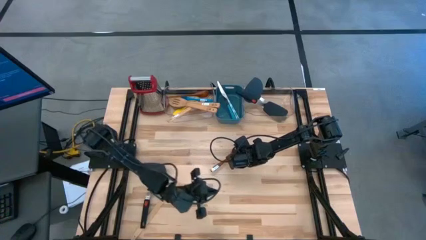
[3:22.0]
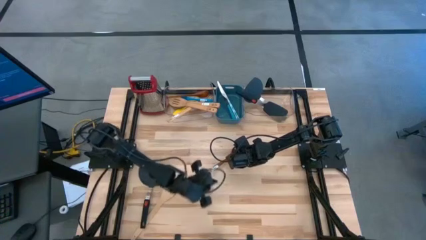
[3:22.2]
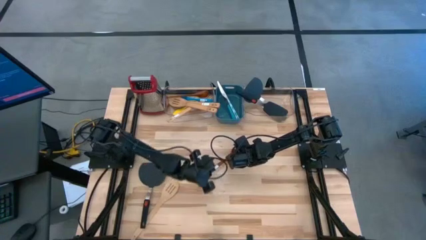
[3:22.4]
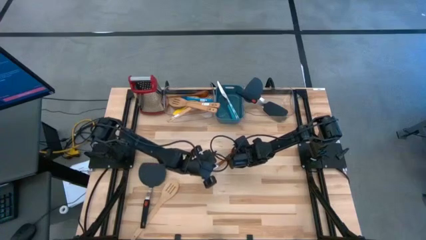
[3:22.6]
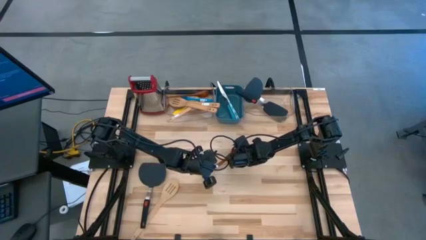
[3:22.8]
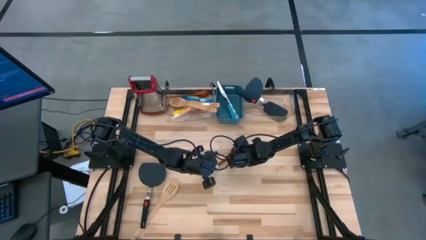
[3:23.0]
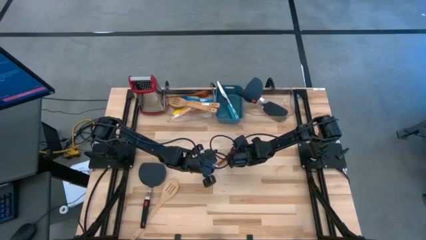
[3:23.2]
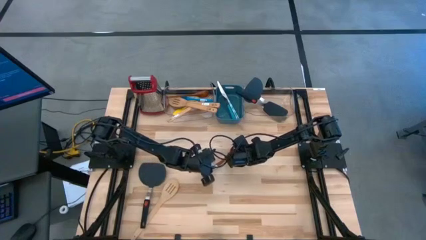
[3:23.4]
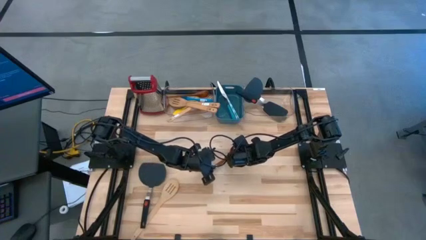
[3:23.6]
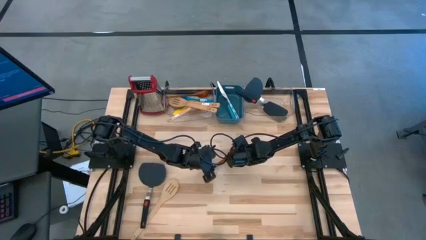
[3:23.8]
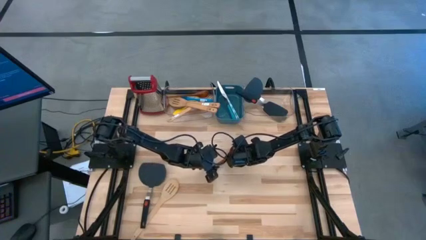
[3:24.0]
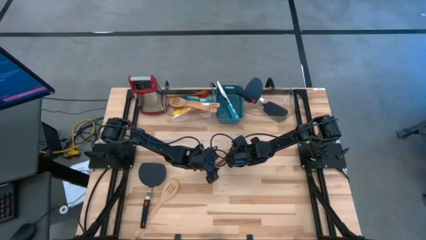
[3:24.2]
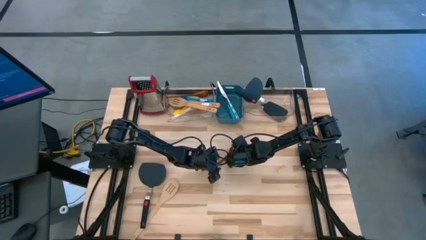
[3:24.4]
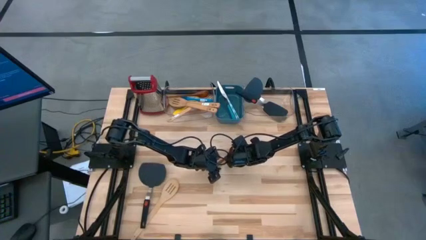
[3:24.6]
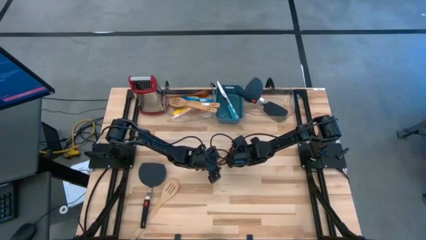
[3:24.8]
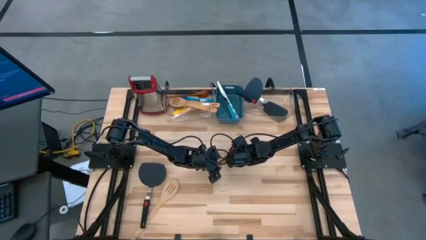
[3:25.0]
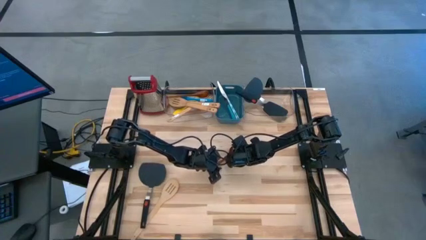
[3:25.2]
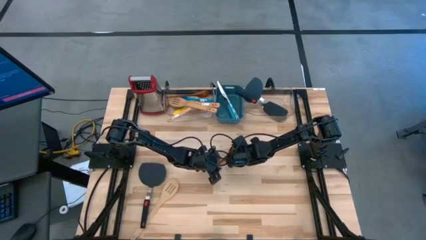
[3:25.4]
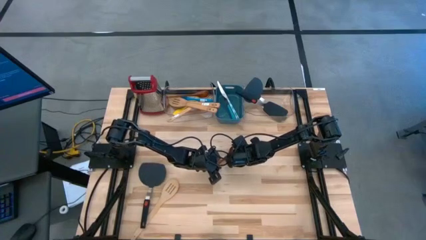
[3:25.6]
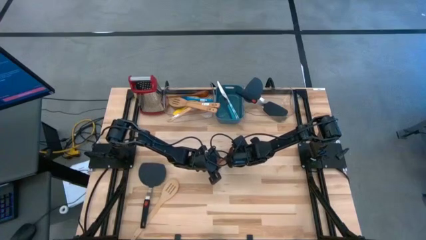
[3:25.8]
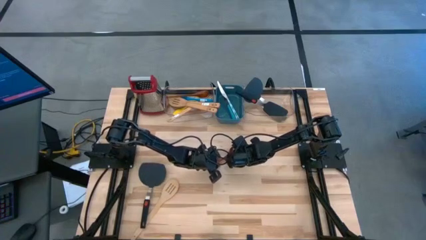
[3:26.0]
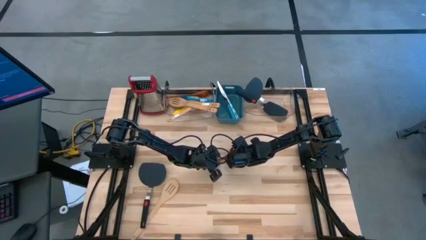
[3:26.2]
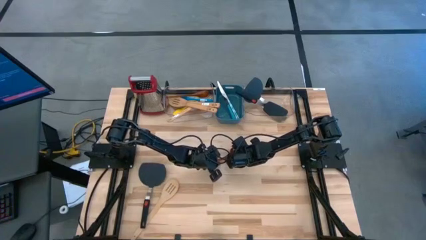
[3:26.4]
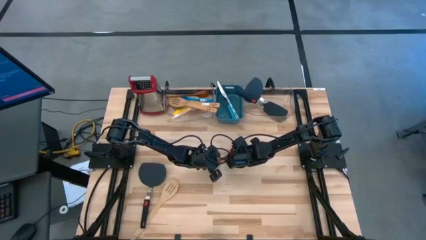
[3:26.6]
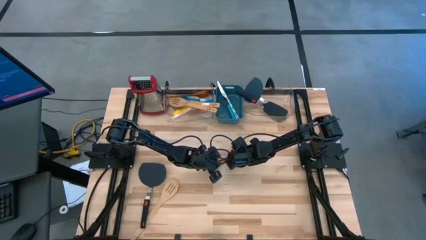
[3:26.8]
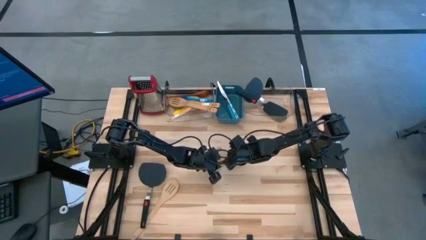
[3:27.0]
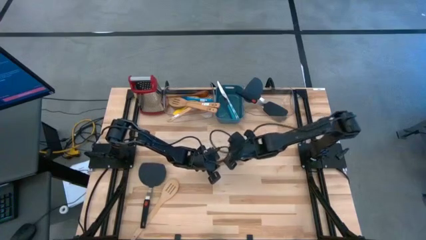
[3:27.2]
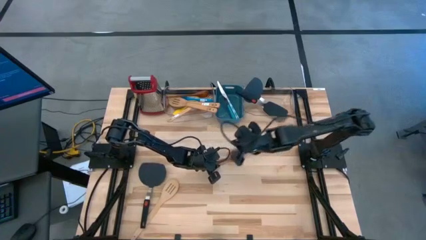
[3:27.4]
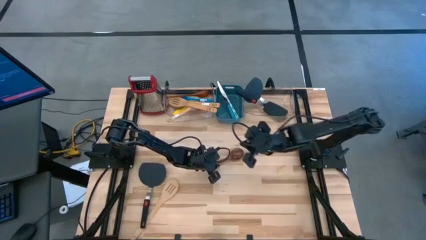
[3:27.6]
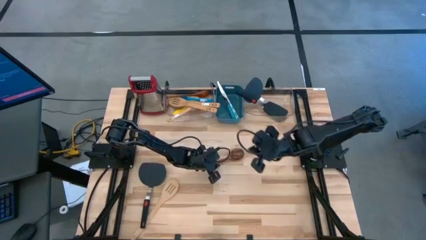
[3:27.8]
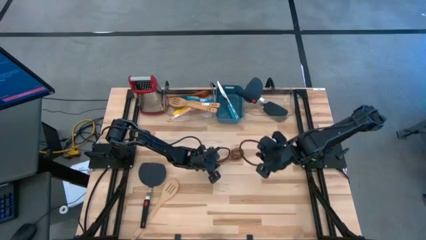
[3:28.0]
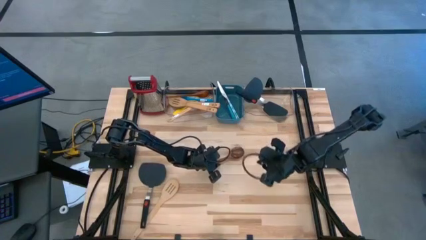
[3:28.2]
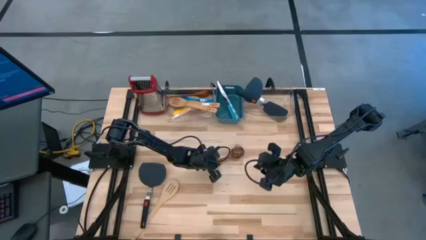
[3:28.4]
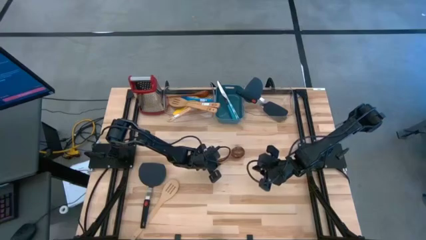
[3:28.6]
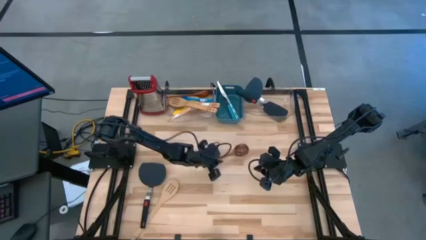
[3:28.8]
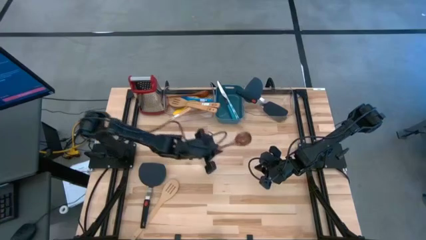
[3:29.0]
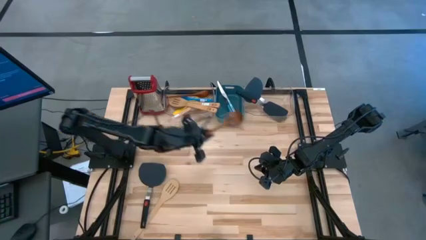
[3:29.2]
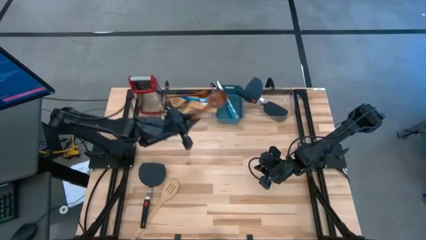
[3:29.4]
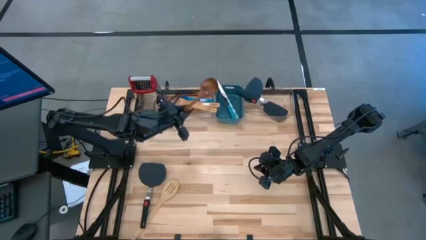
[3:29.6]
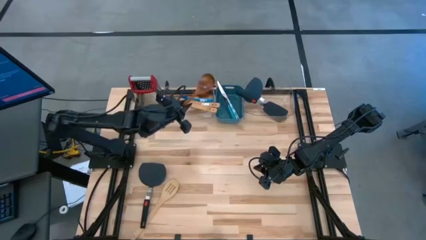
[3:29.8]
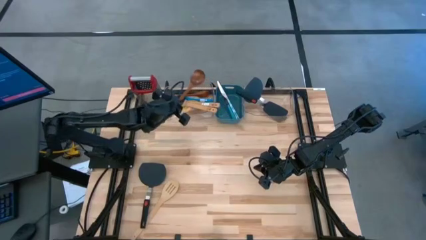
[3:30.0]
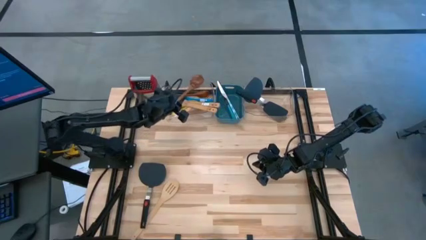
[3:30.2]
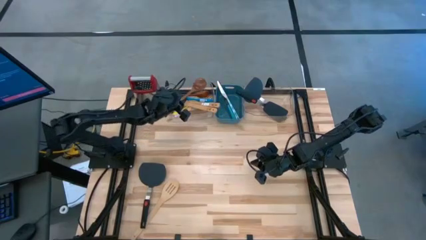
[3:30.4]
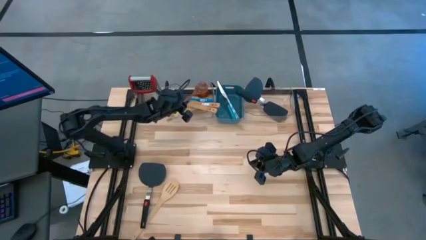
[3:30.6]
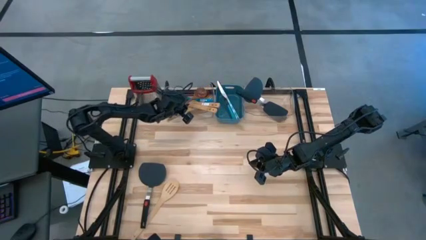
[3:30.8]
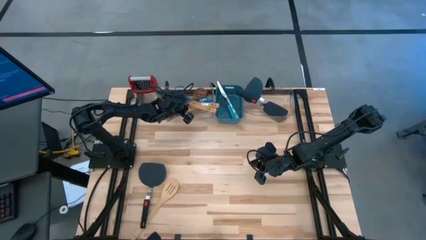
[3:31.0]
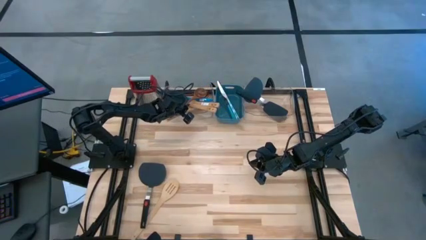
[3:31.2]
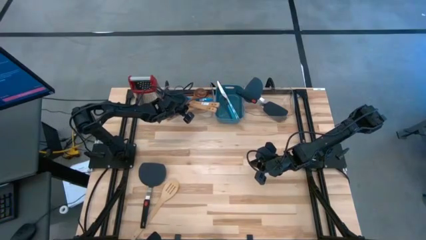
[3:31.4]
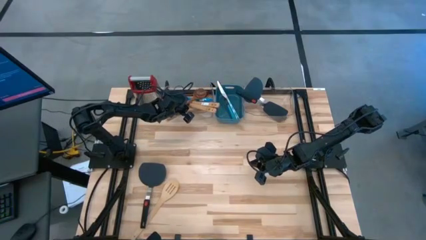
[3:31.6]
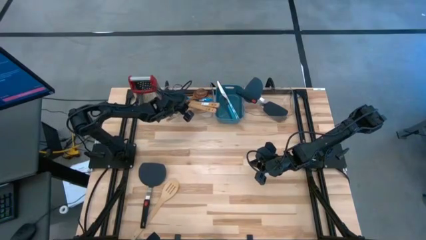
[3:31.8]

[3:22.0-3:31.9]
Task: Pick & Place Kitchen Items
Put the brown serving spoon into the left transparent bin

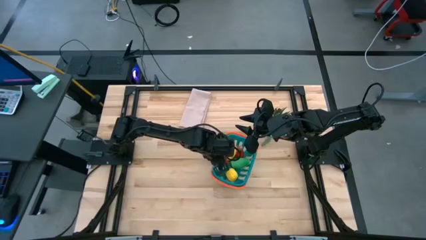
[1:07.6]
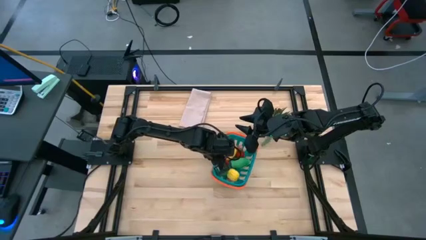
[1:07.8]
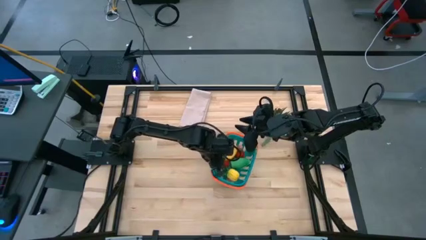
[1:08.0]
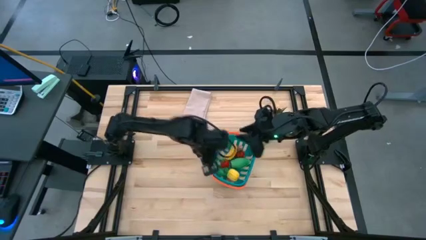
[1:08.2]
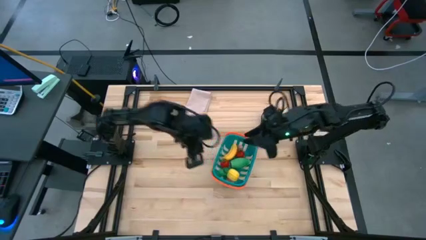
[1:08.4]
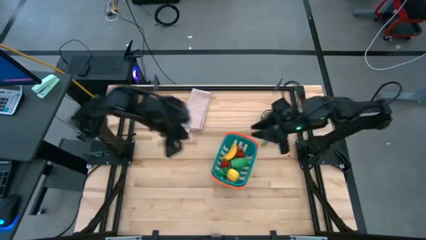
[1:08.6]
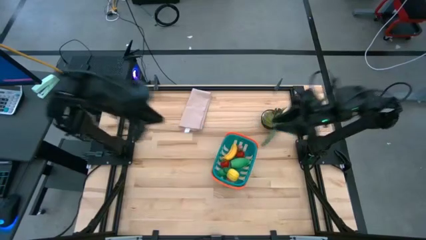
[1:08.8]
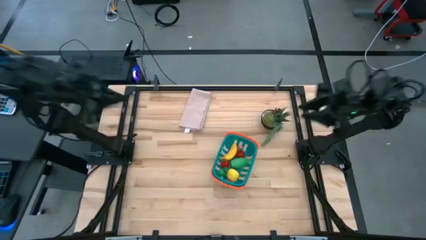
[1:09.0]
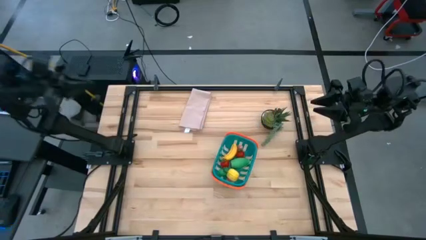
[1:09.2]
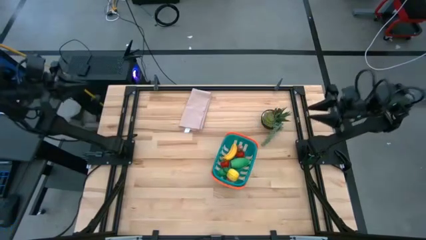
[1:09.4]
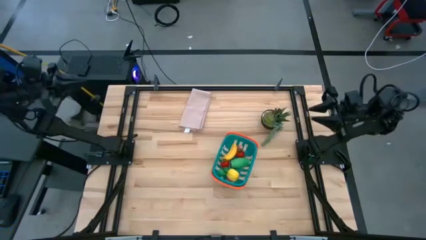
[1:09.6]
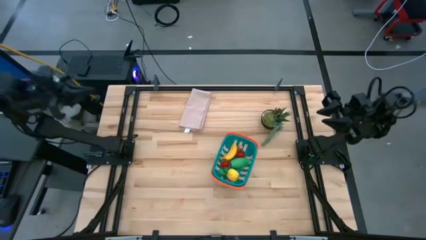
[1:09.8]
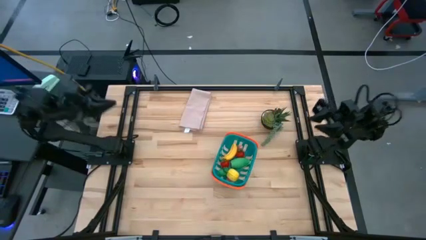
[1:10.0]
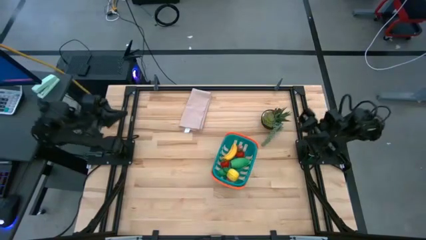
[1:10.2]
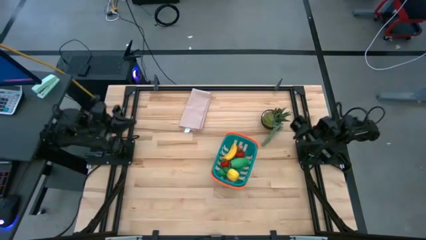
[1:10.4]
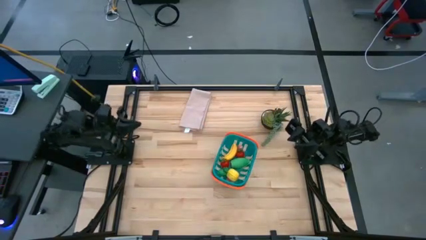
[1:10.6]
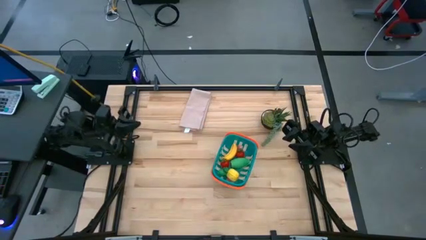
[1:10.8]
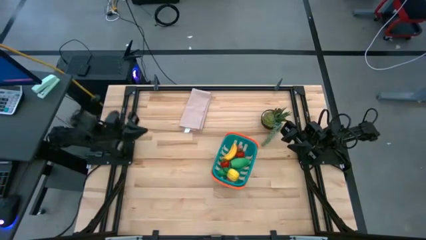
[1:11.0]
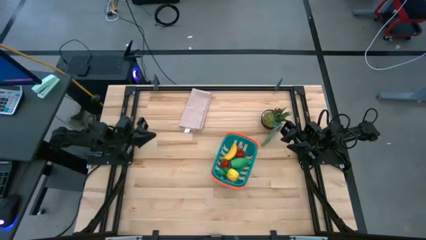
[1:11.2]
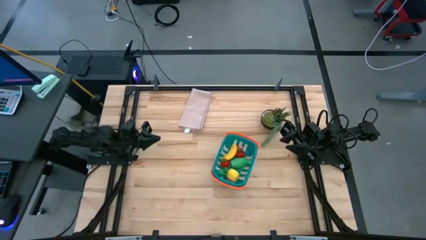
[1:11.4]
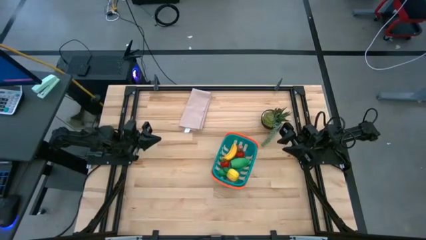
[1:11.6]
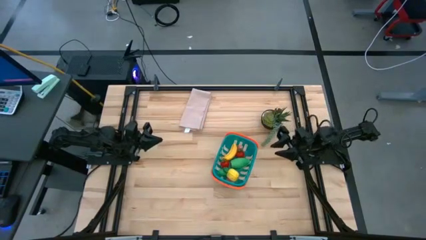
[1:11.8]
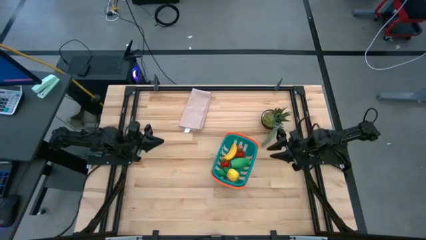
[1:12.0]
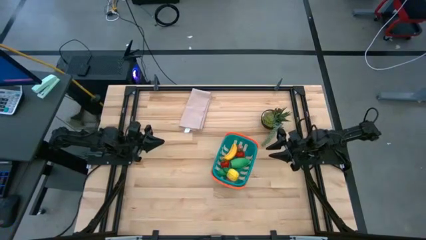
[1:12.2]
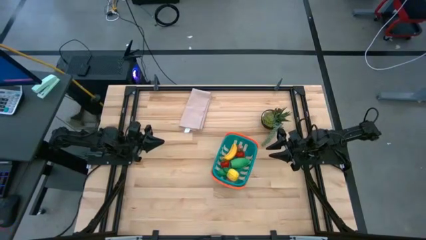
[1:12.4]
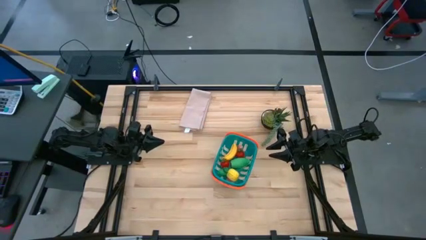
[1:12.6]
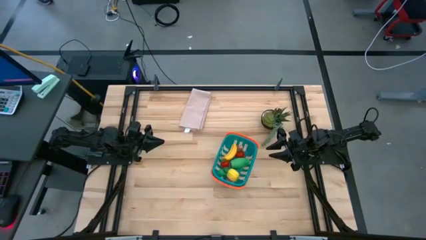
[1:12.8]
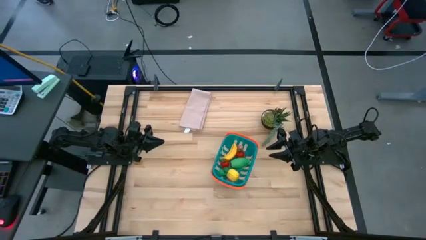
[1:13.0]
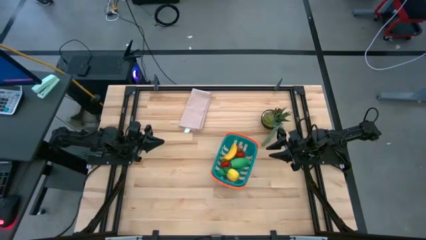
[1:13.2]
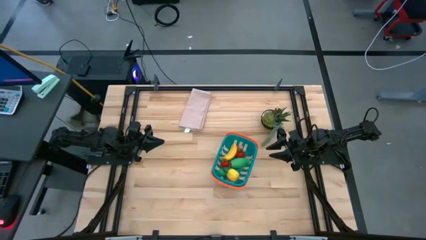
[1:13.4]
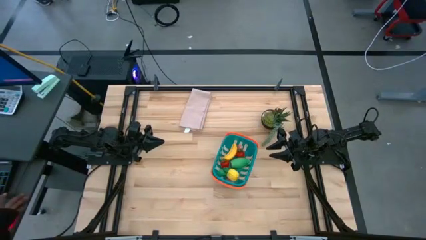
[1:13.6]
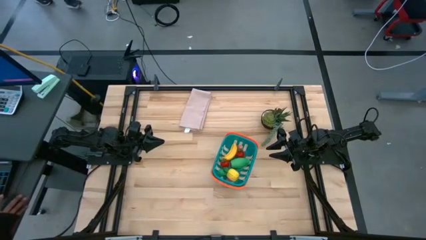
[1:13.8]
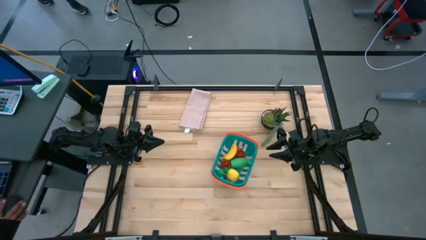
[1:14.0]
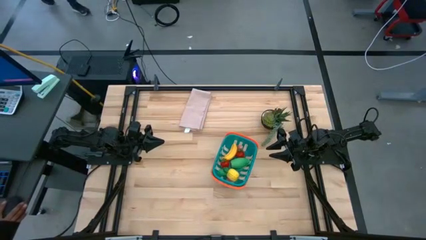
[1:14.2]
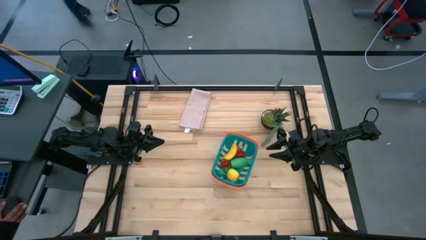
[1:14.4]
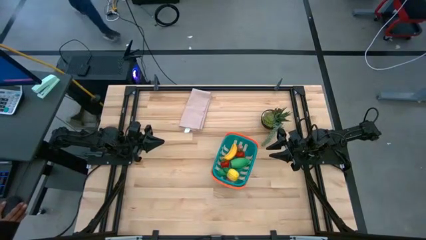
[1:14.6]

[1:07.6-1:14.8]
Task: Pick and placing Produce into tupperware
Return to Home Position
